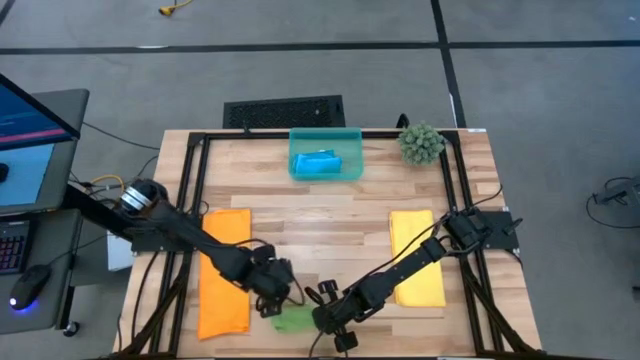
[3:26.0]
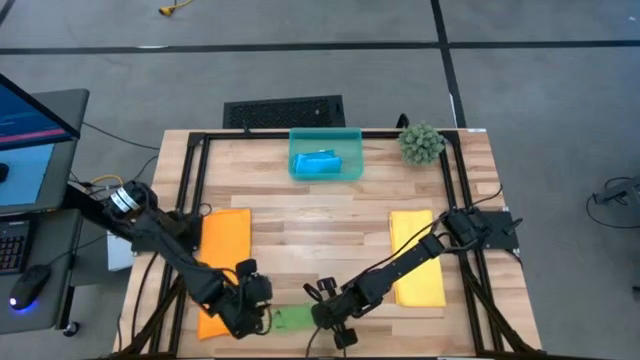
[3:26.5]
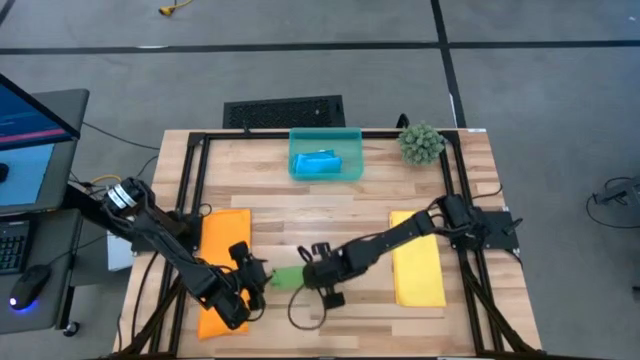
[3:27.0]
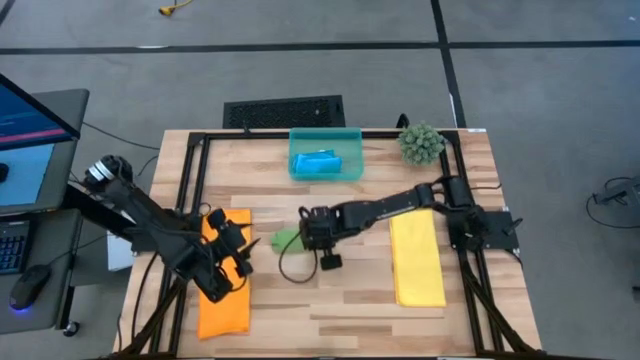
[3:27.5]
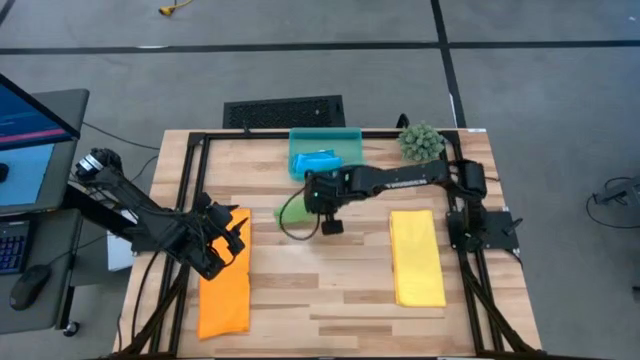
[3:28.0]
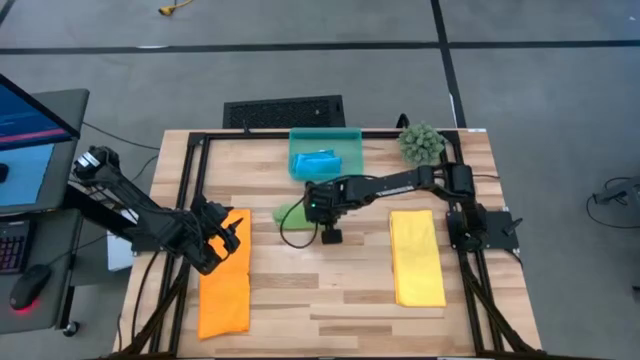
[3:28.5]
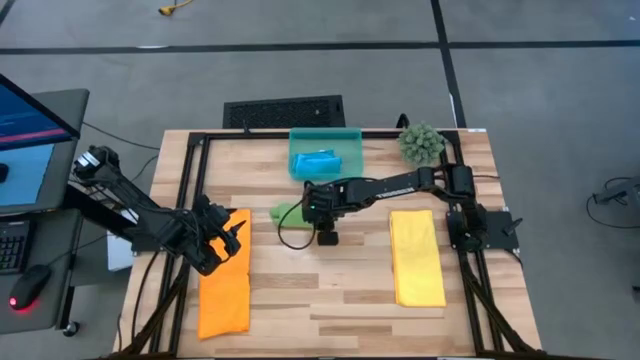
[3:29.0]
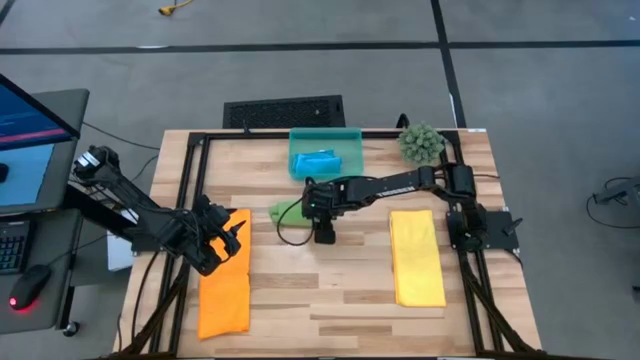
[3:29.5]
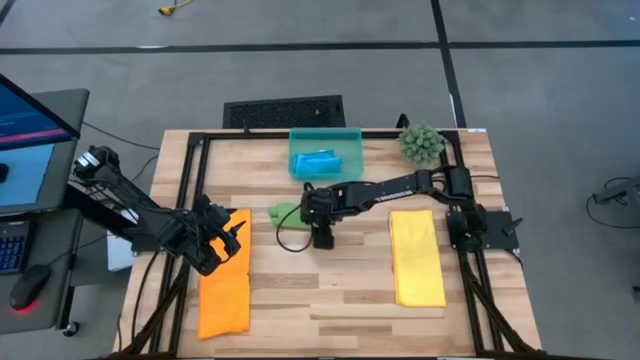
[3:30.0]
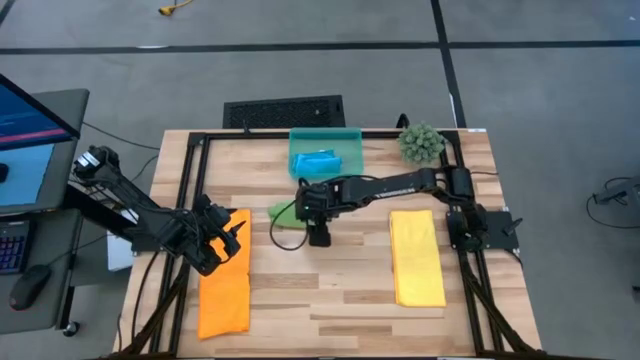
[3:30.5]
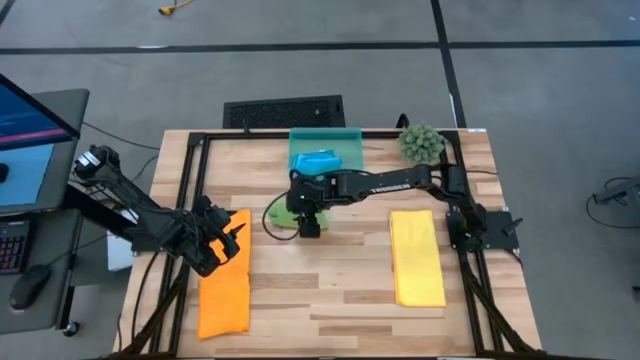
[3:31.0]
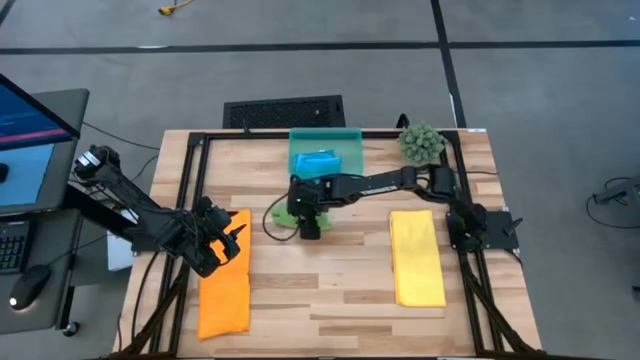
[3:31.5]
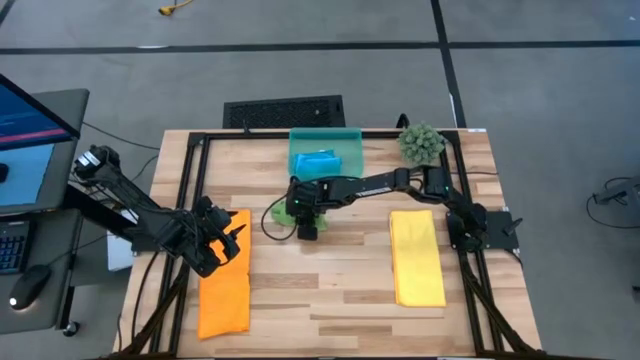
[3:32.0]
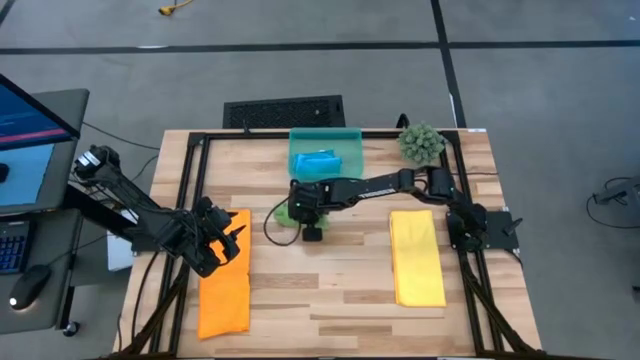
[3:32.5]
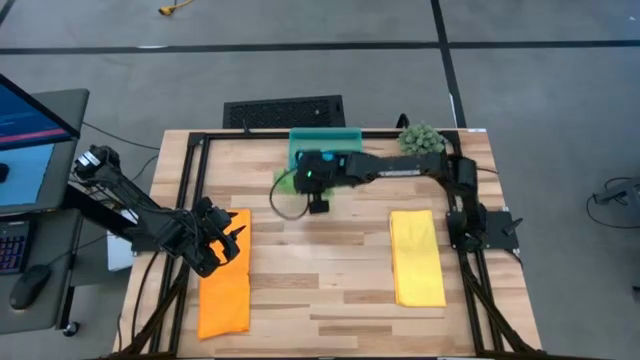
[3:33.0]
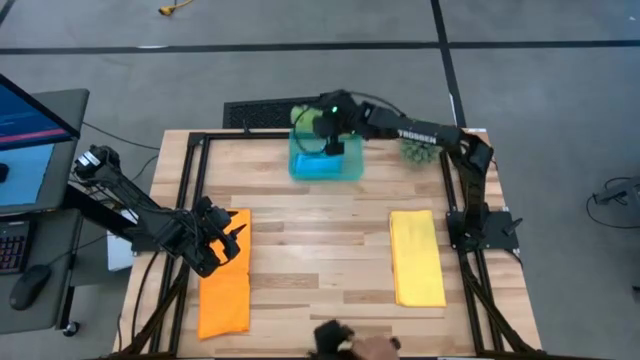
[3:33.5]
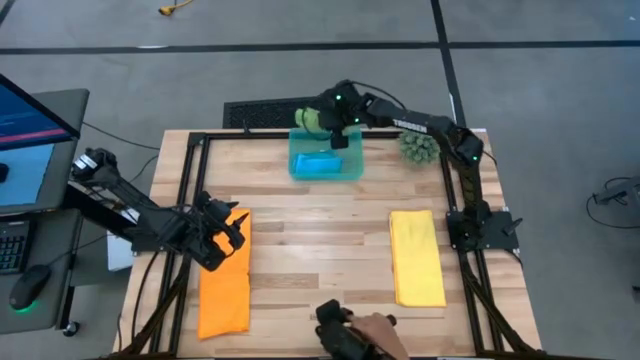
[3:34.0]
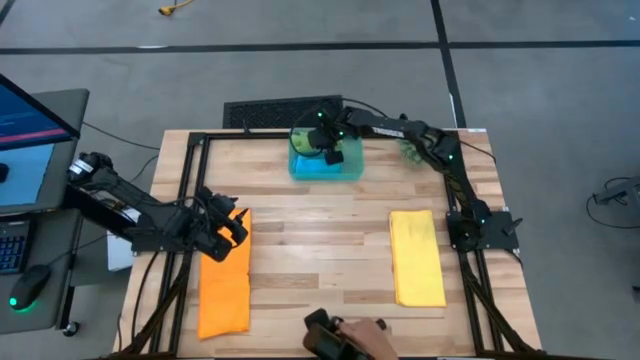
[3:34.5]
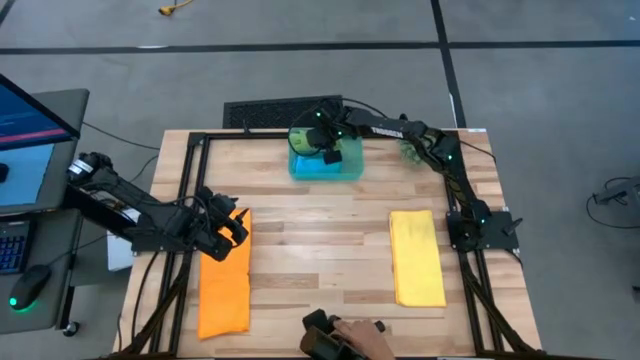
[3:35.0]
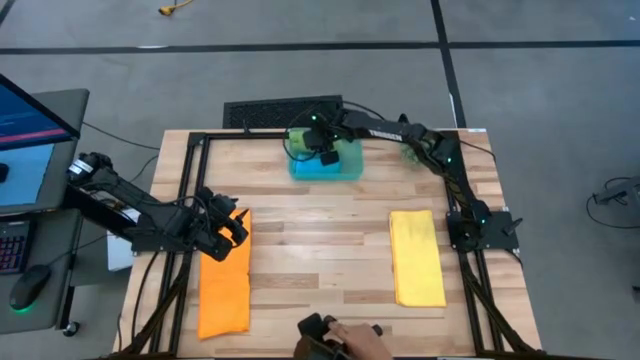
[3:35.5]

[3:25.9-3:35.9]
Task: Roll microfiber towels into tight, uniform cylinder then place into a basket
Put the rolled green towel into the green bin

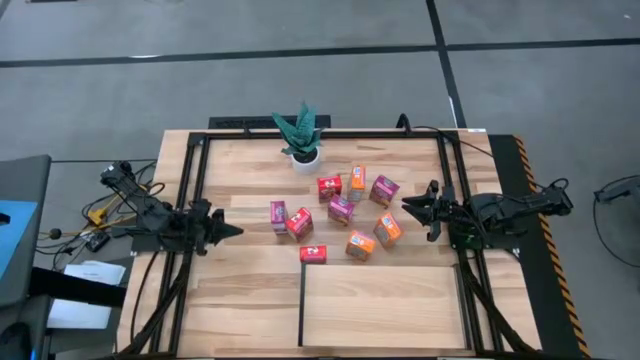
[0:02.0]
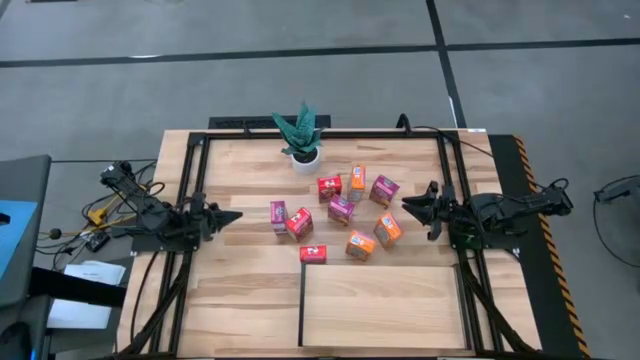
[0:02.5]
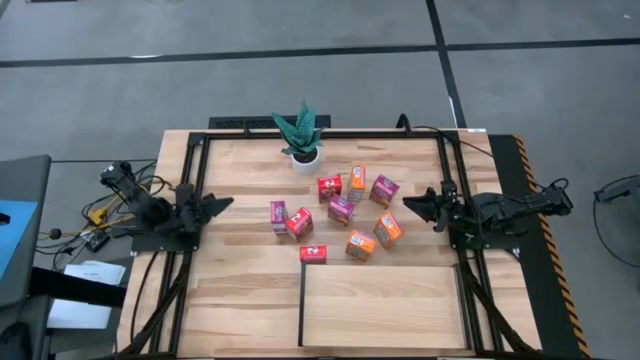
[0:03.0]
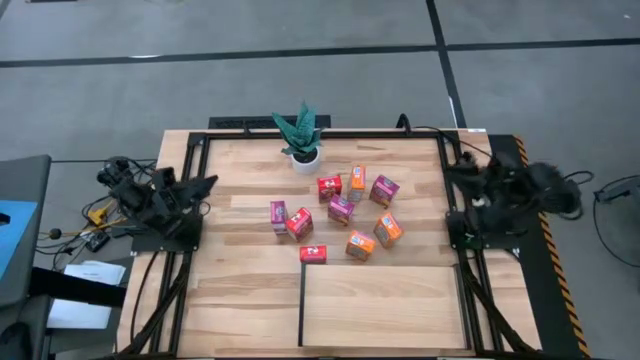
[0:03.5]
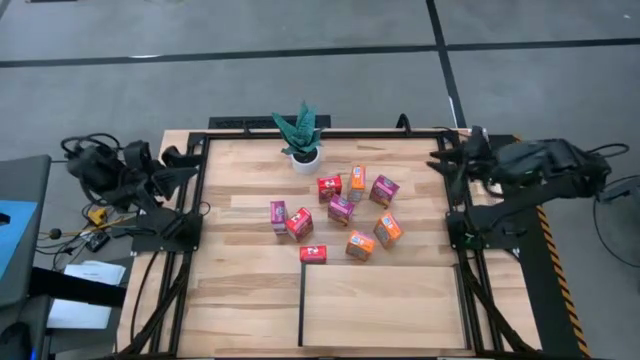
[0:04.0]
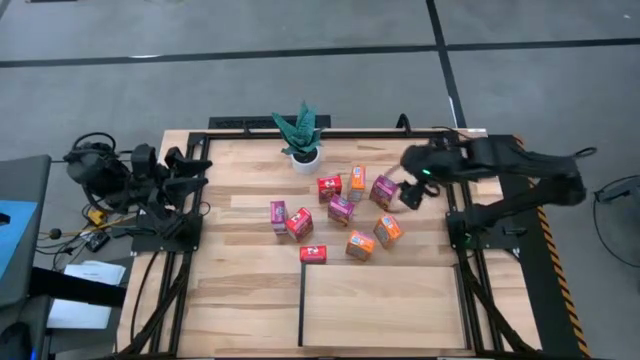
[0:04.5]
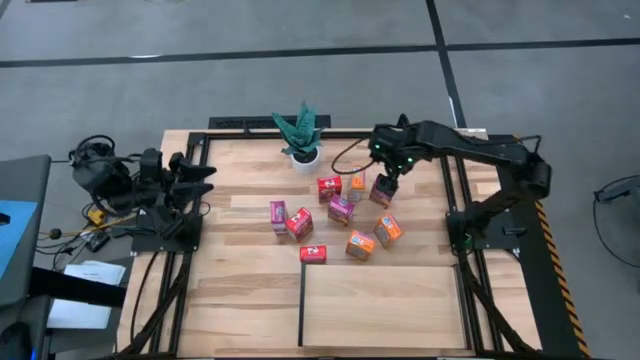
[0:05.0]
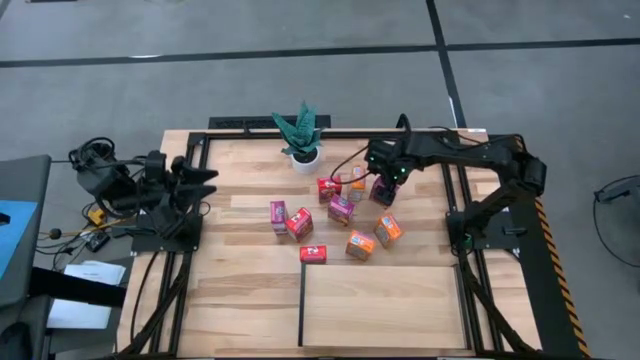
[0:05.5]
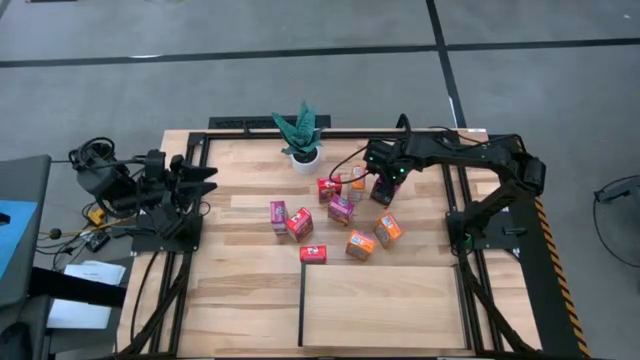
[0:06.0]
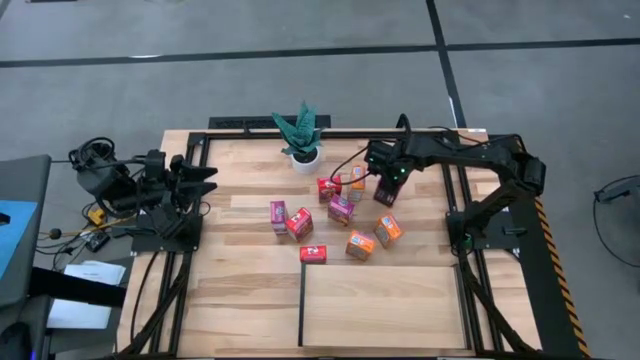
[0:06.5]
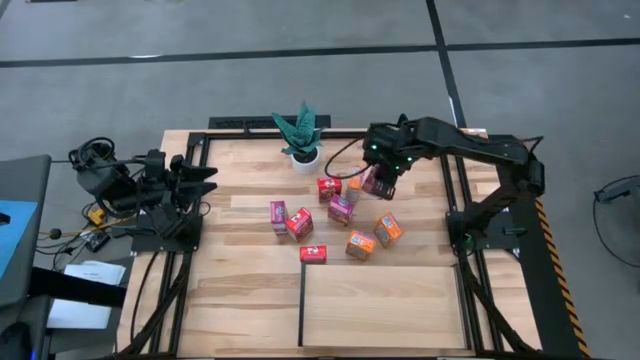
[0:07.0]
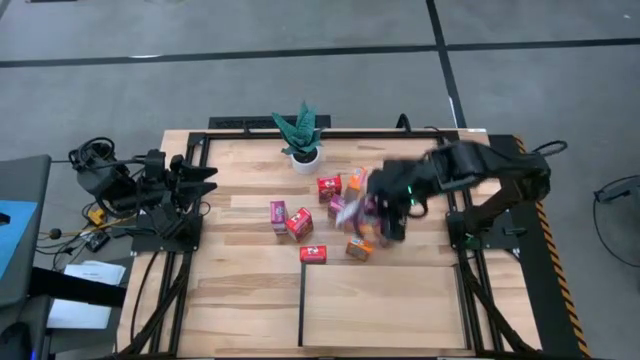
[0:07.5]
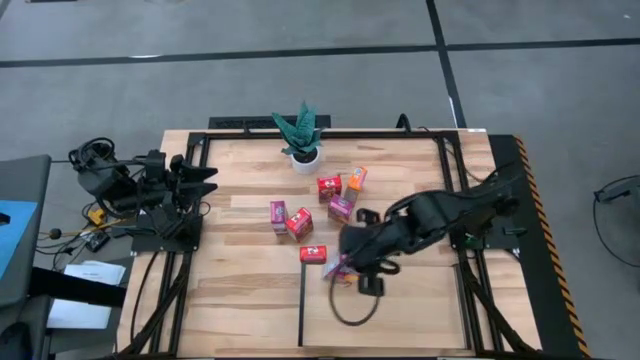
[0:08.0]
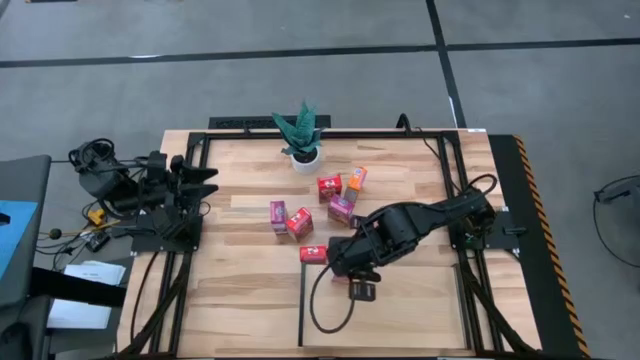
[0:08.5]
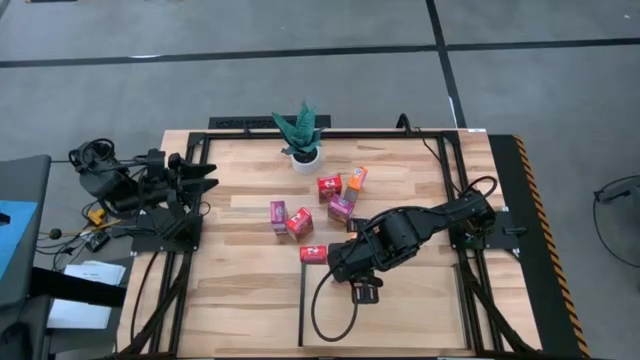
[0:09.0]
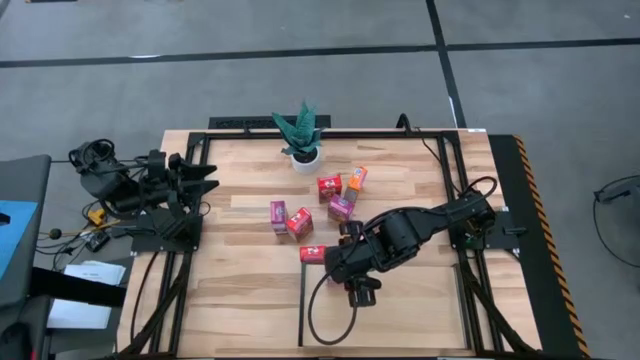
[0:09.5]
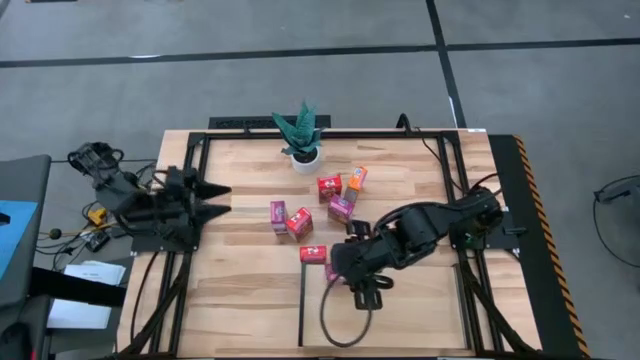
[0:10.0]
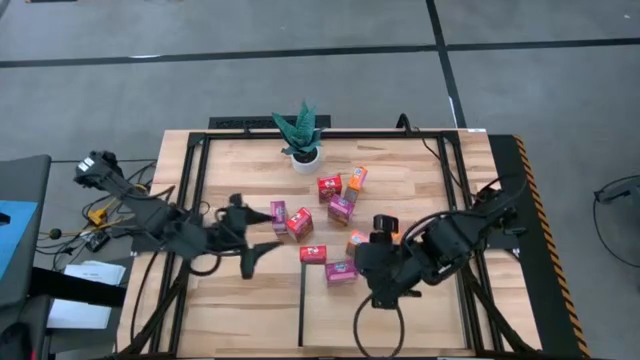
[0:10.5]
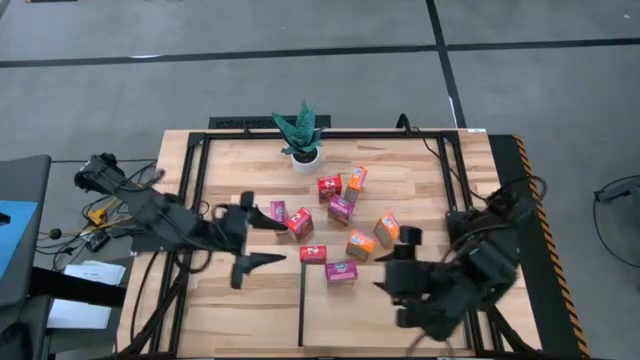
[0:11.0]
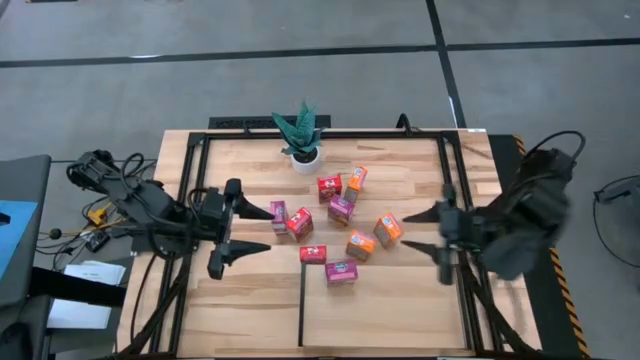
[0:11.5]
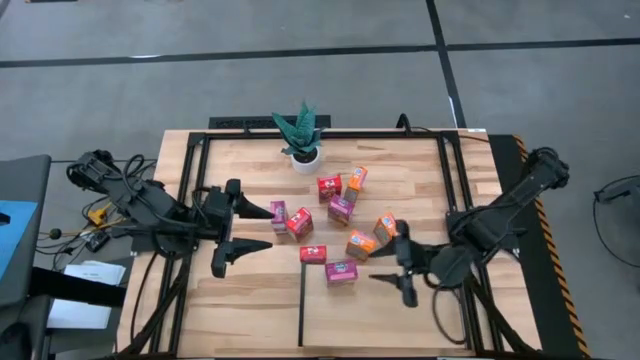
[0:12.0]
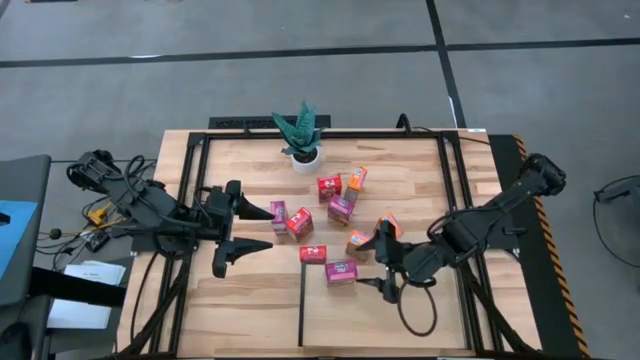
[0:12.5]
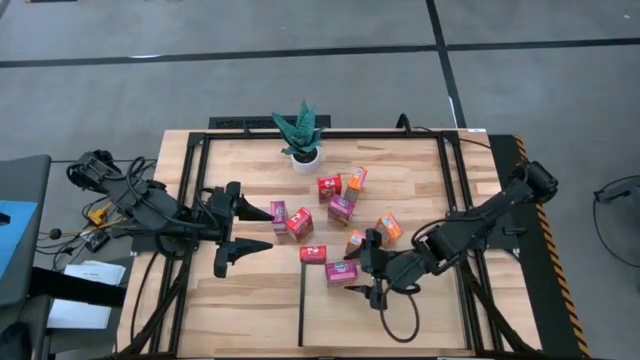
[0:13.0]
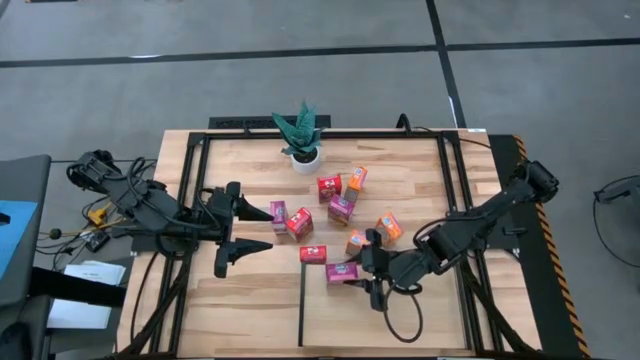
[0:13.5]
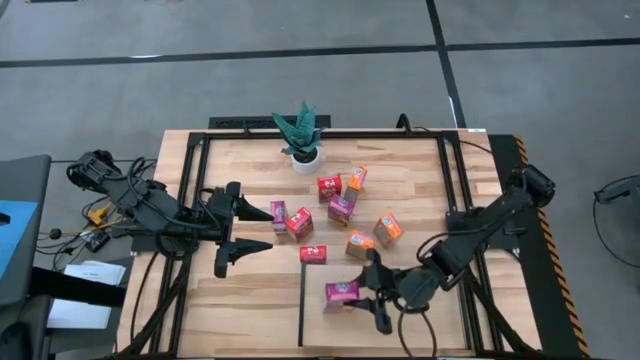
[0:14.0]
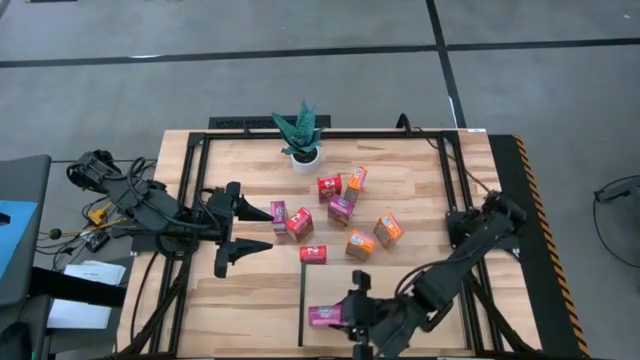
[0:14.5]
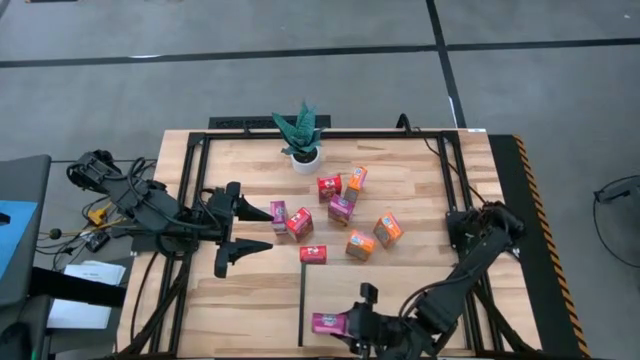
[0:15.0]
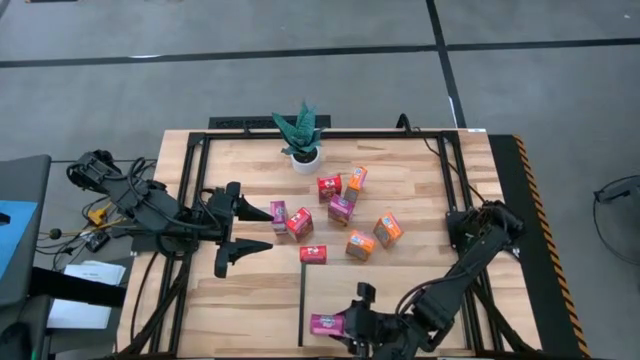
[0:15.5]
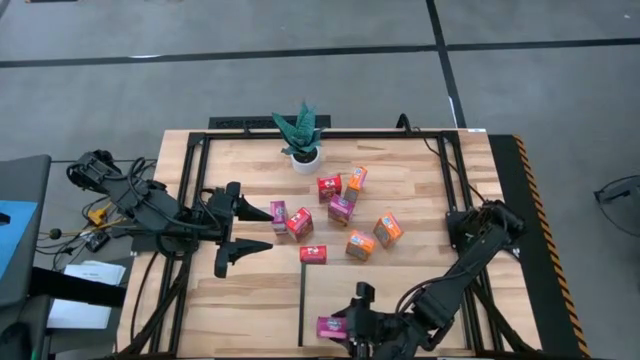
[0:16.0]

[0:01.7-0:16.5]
Task: Stack cereal on shelf
Put the purple cereal box on the upper left shelf
